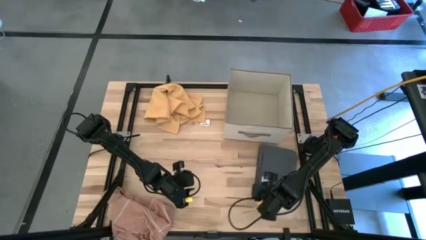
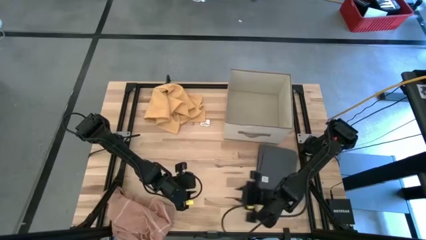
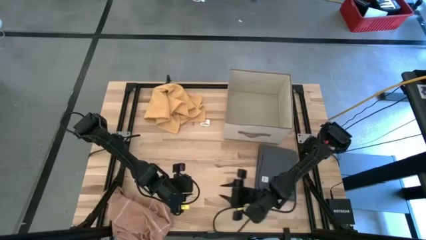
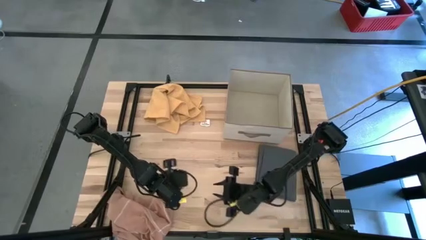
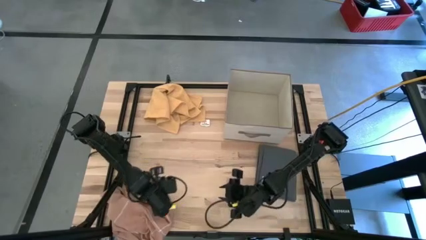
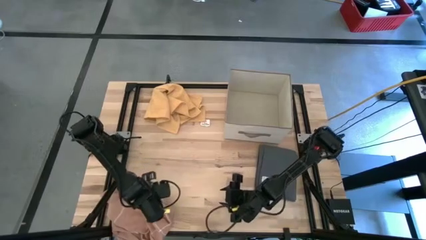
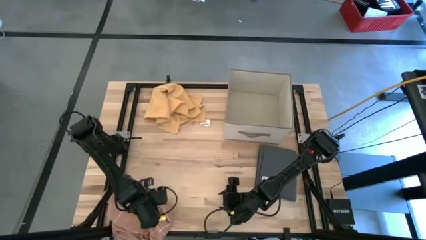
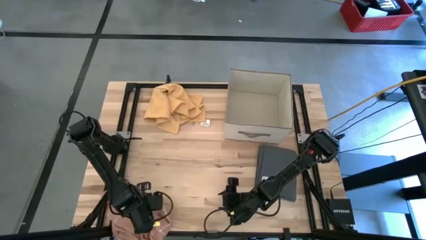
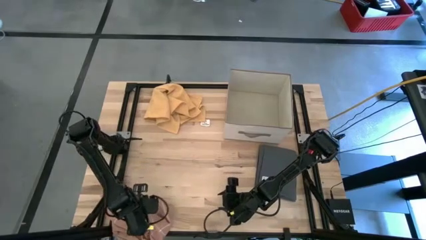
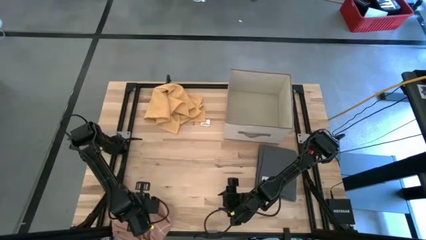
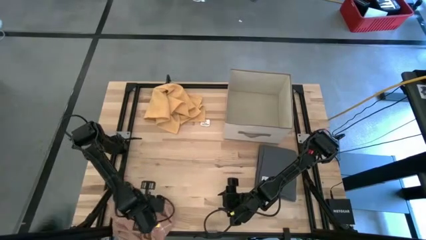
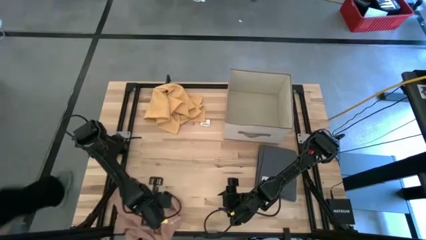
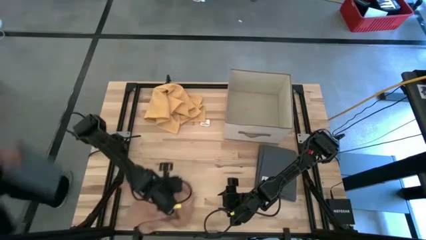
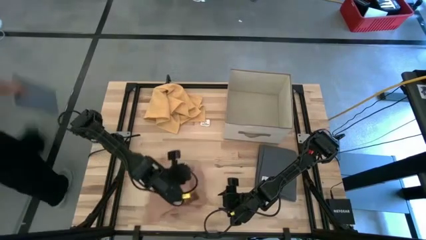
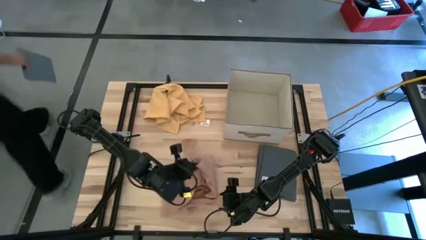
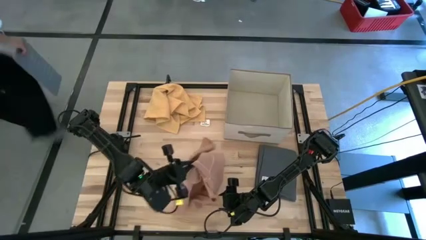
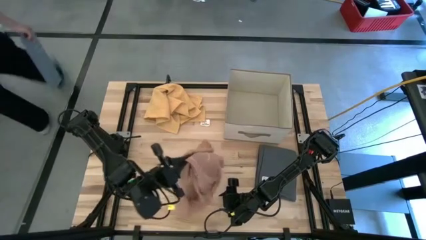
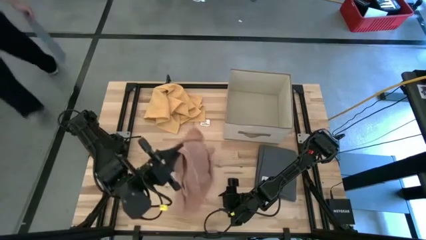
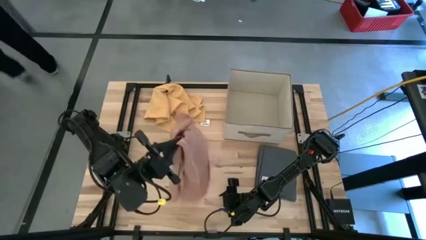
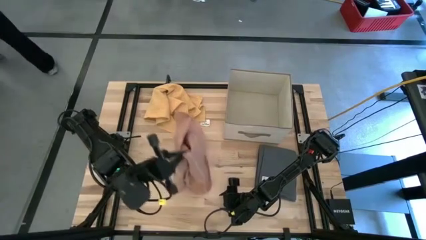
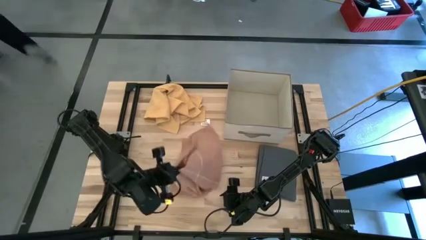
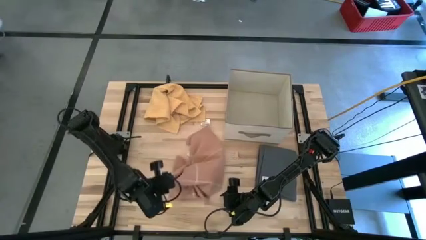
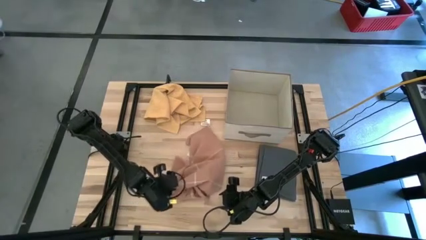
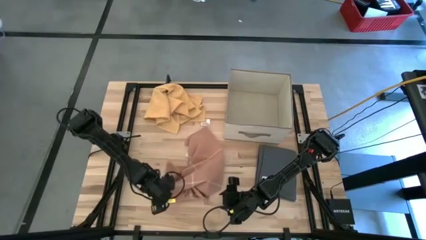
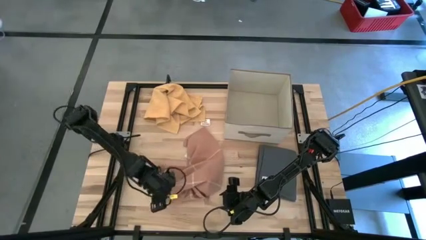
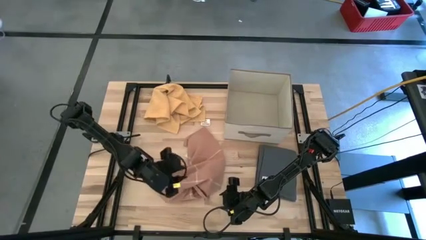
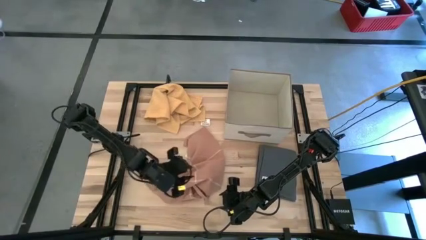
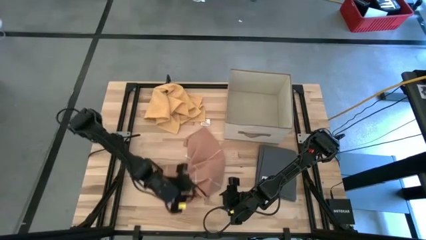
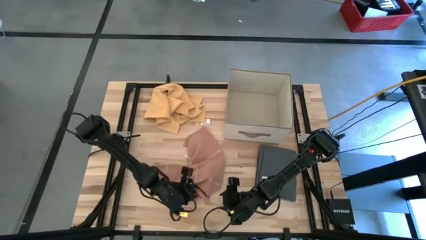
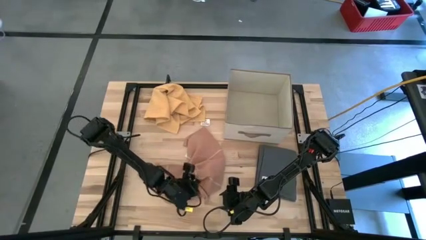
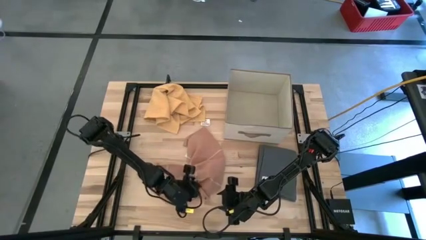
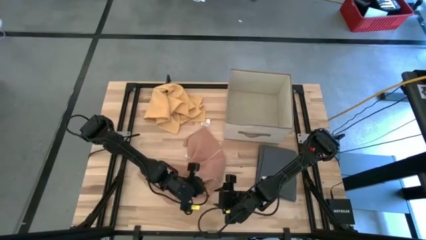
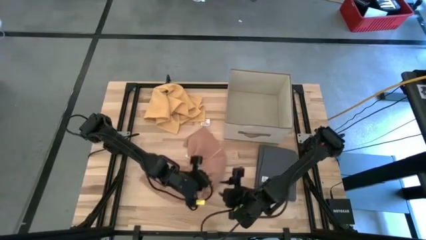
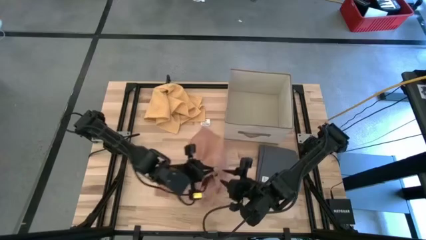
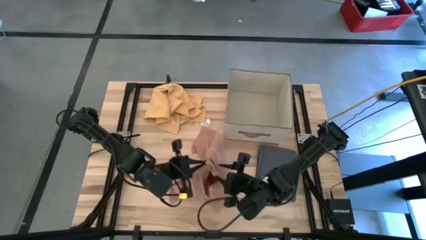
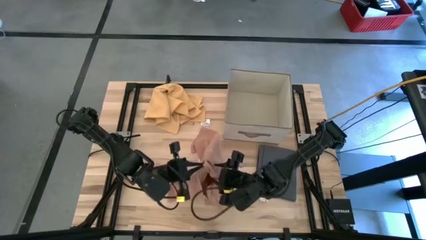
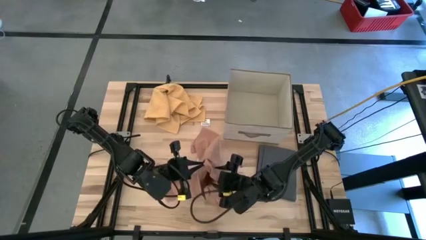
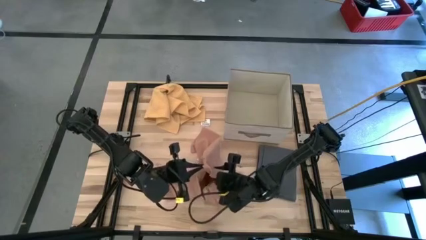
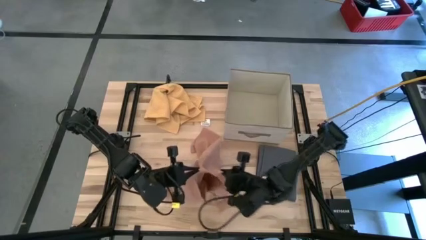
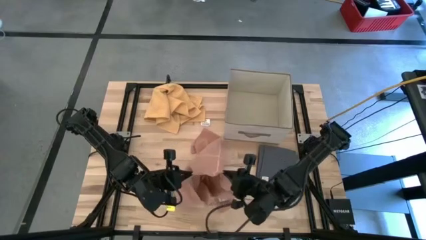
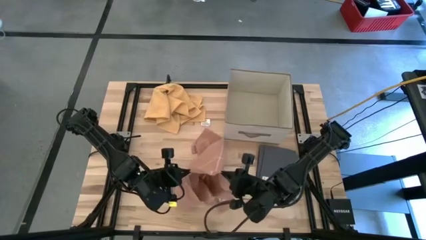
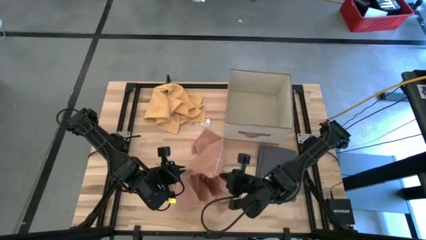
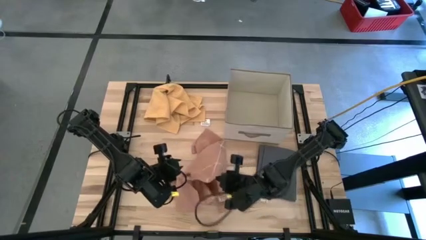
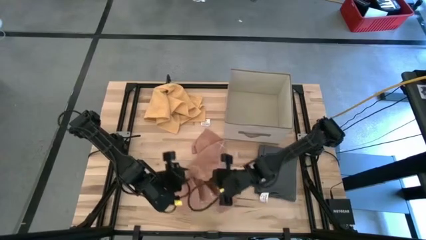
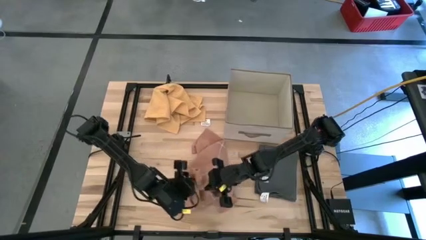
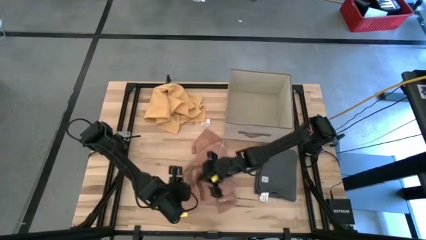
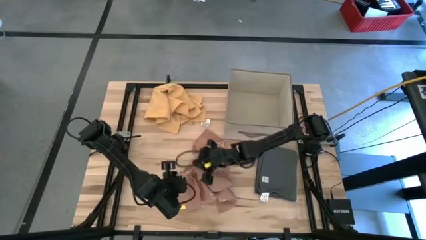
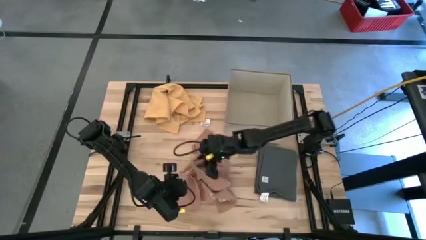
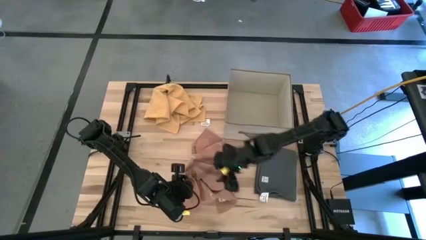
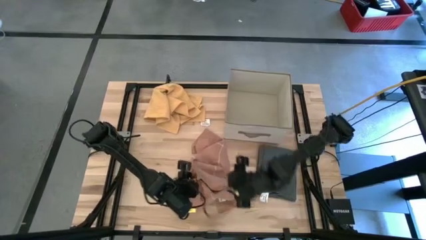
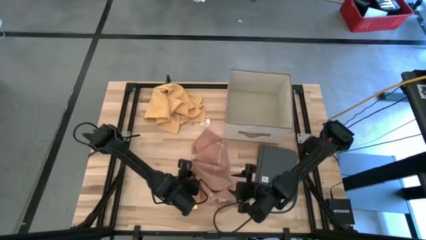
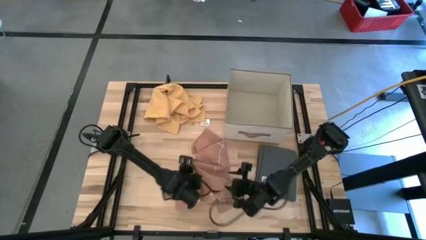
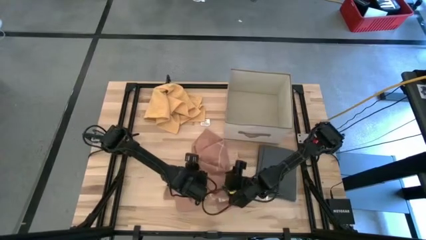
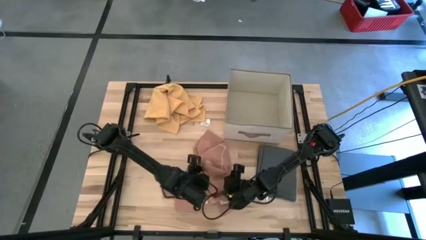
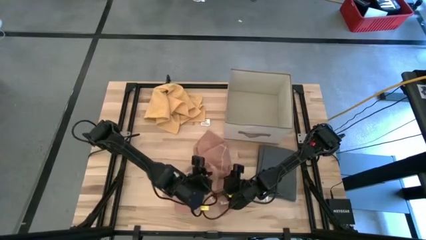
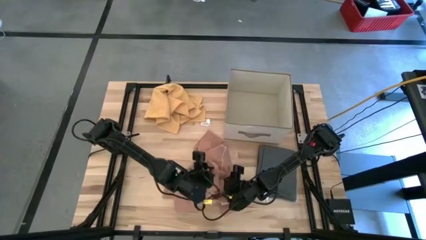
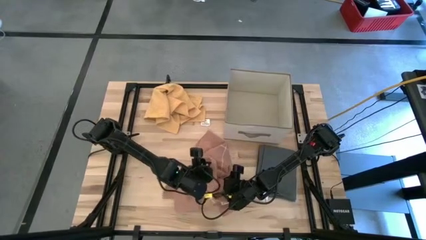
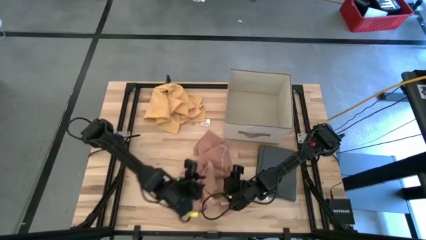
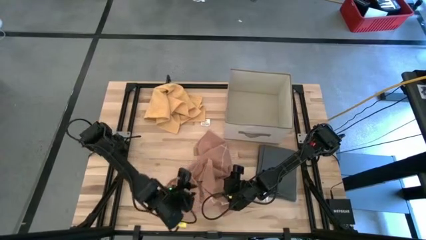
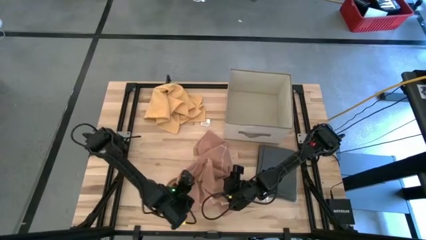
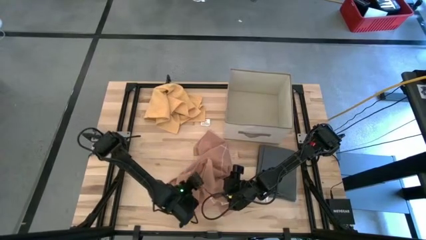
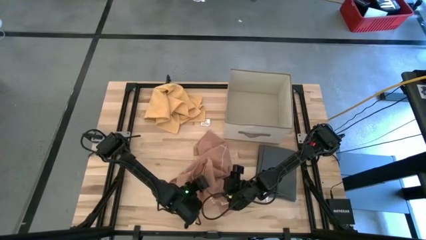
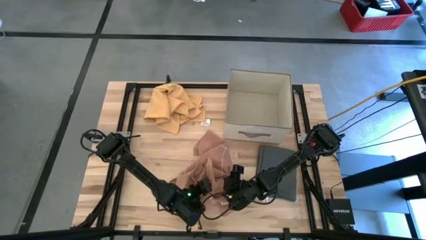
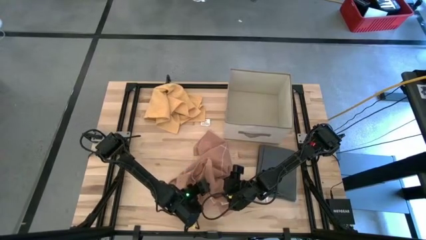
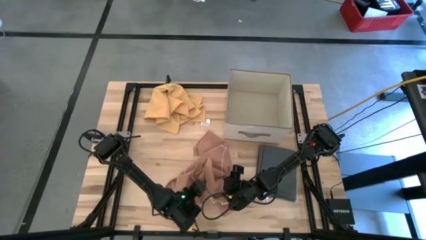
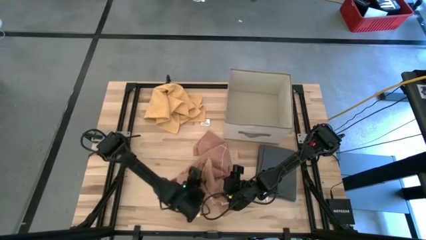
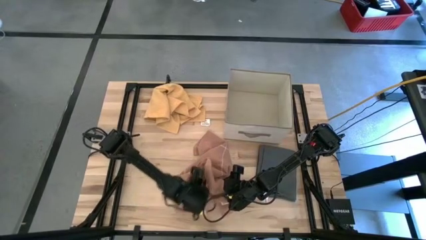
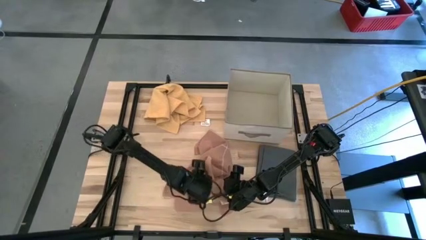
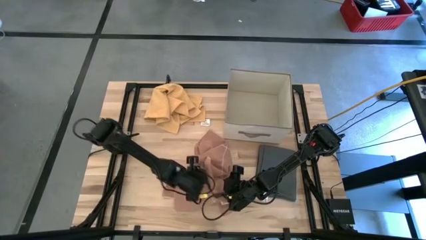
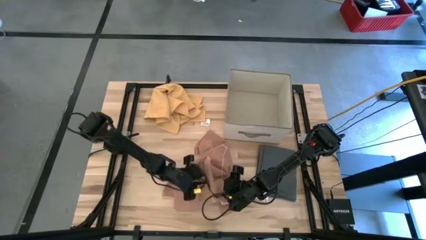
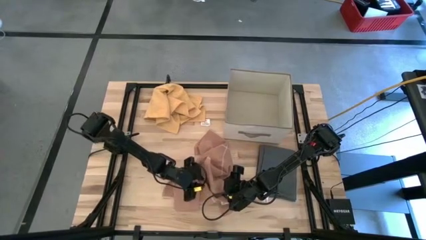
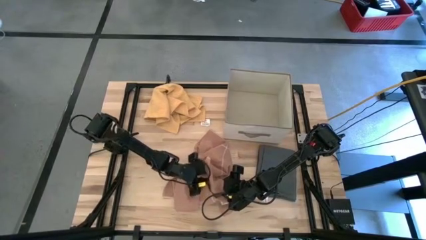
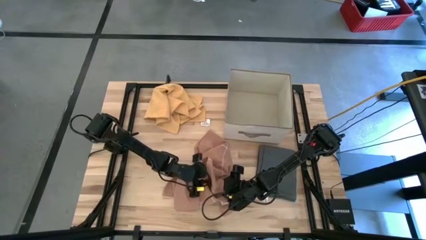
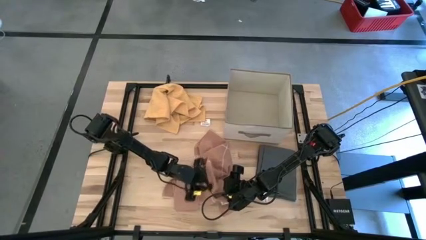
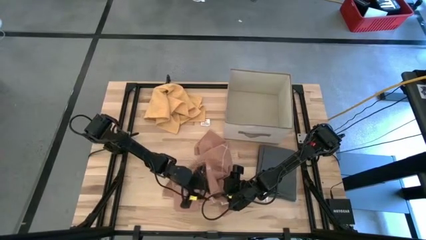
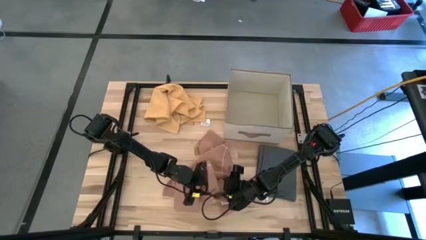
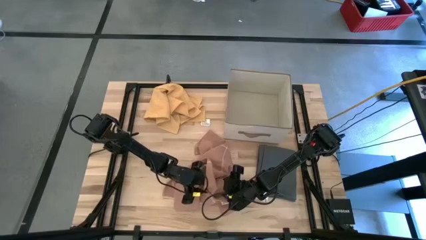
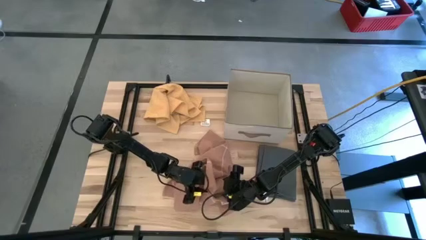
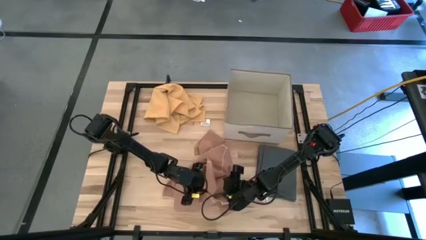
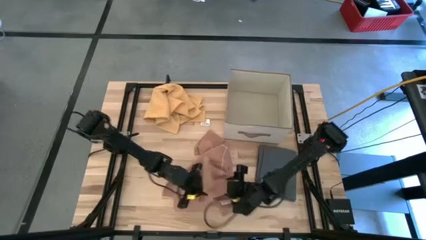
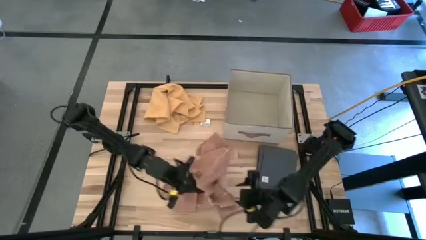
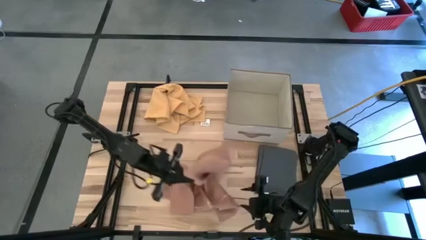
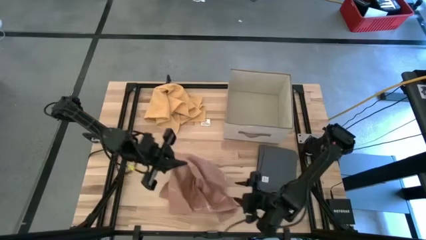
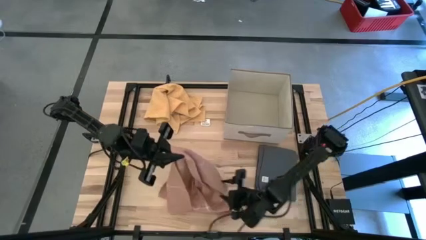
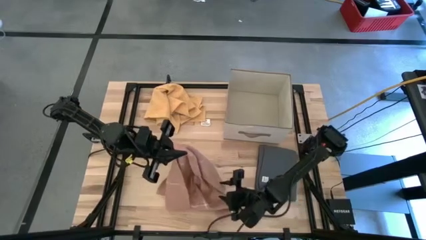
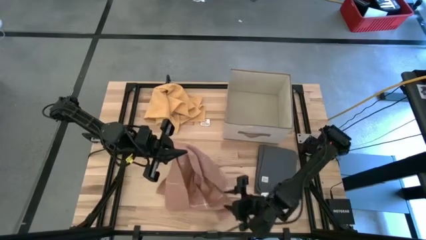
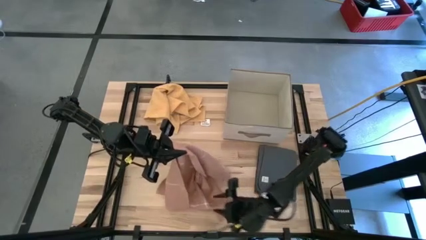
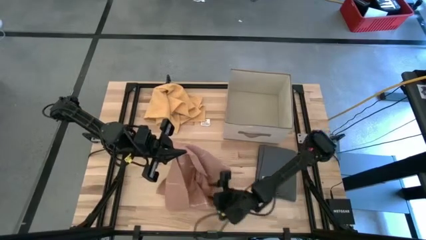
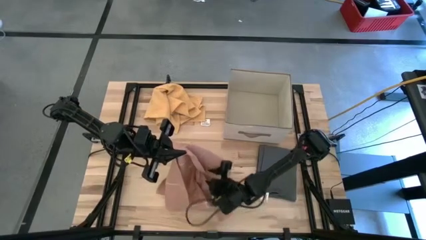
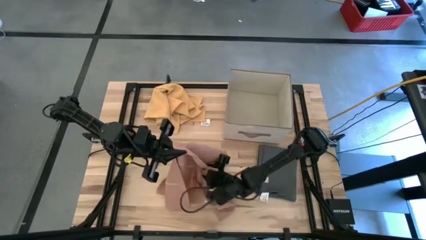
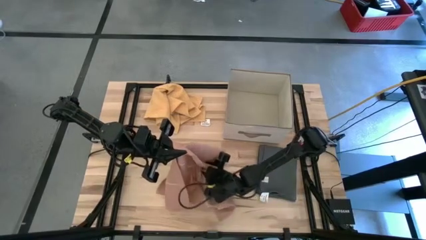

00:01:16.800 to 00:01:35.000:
Task: Fold towel
Fold the light orange towel
